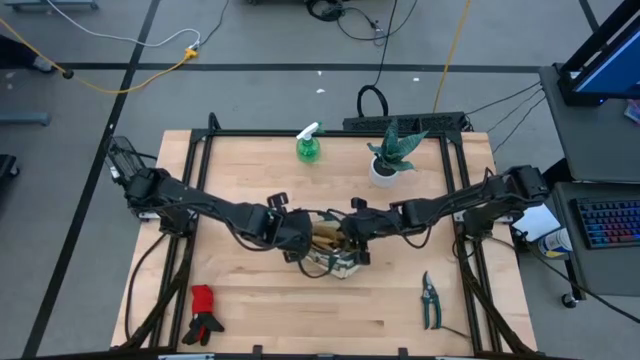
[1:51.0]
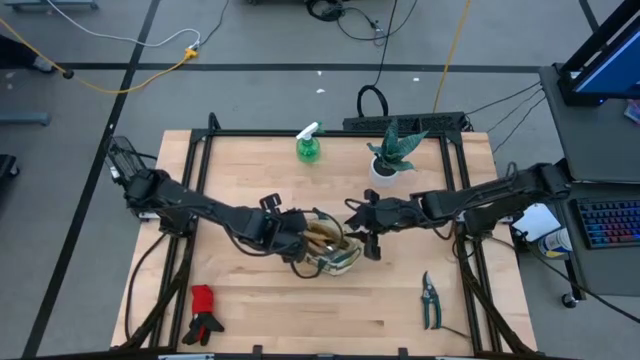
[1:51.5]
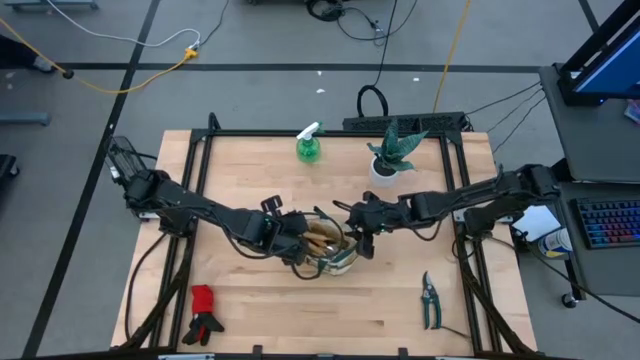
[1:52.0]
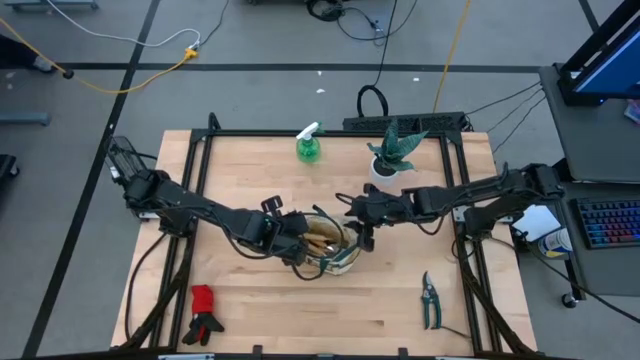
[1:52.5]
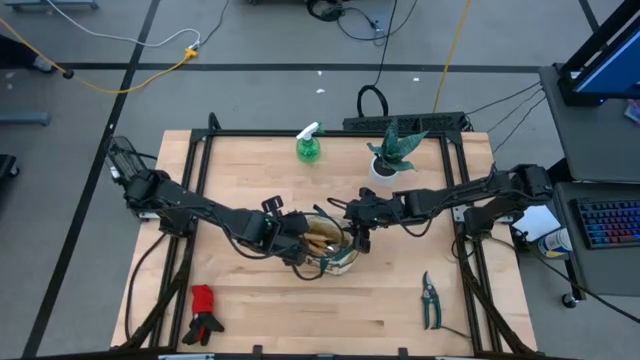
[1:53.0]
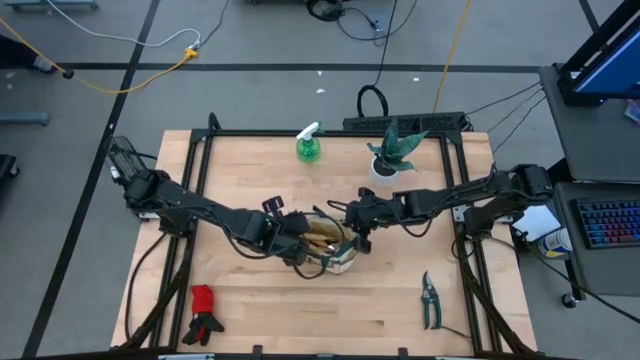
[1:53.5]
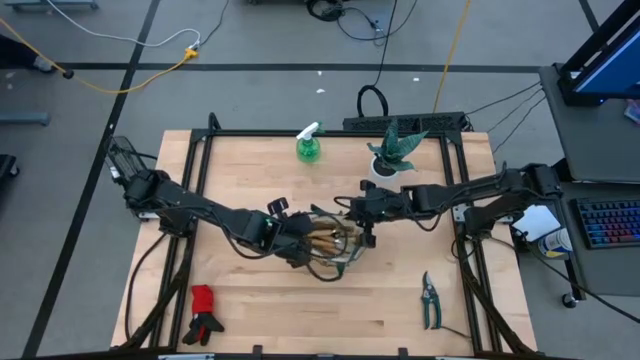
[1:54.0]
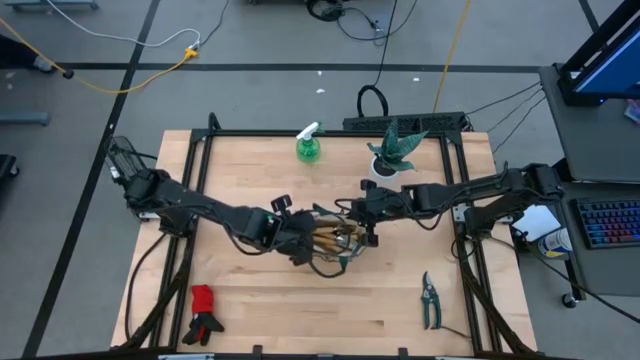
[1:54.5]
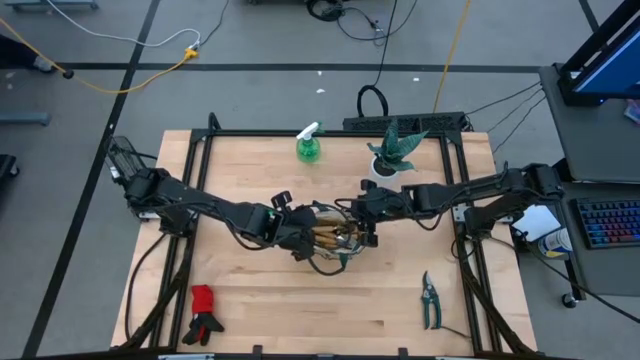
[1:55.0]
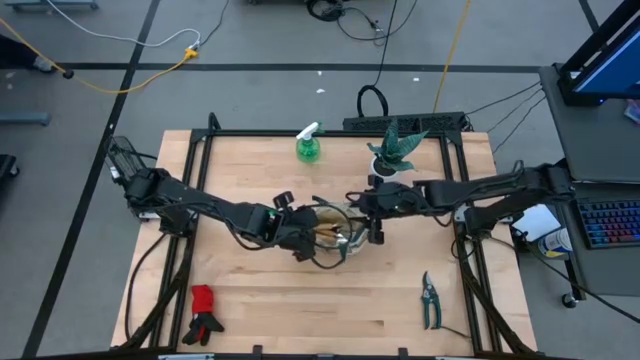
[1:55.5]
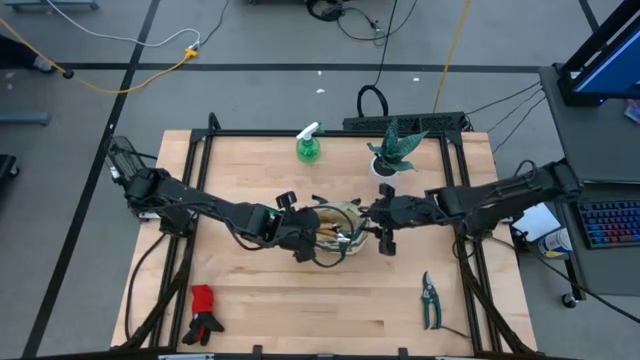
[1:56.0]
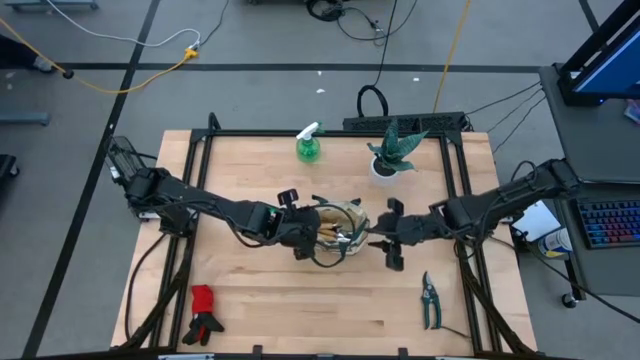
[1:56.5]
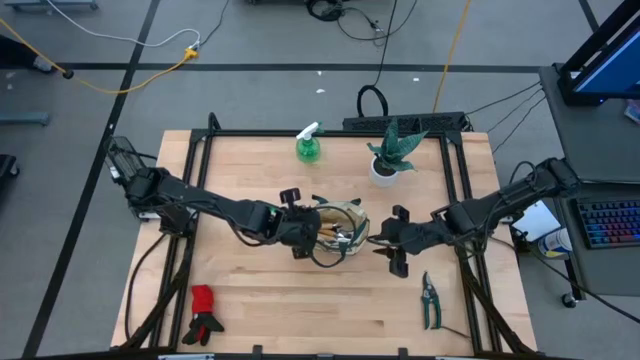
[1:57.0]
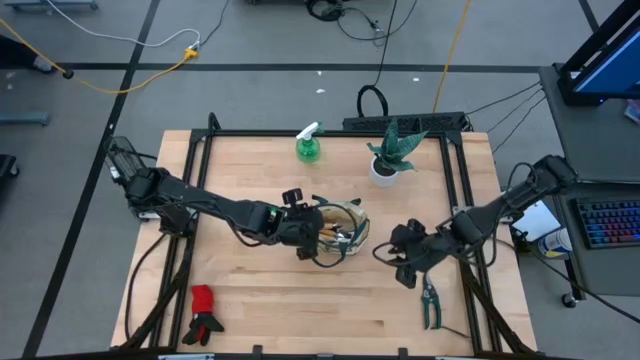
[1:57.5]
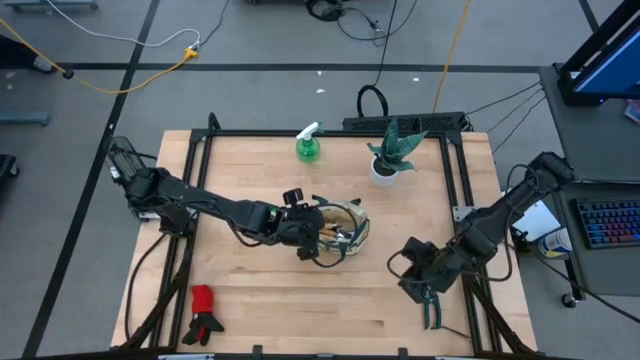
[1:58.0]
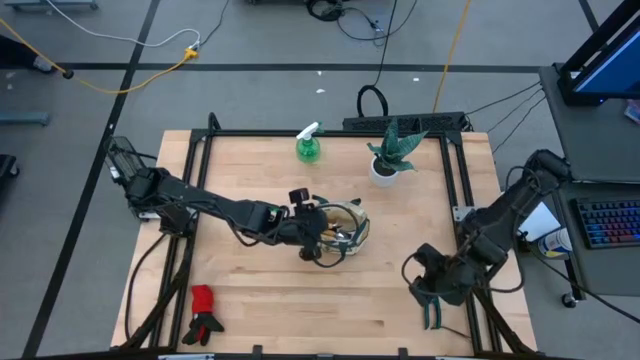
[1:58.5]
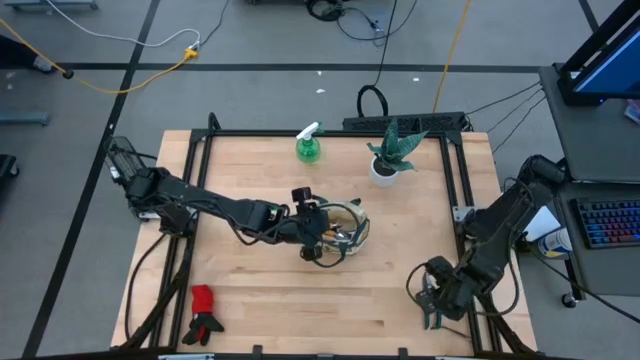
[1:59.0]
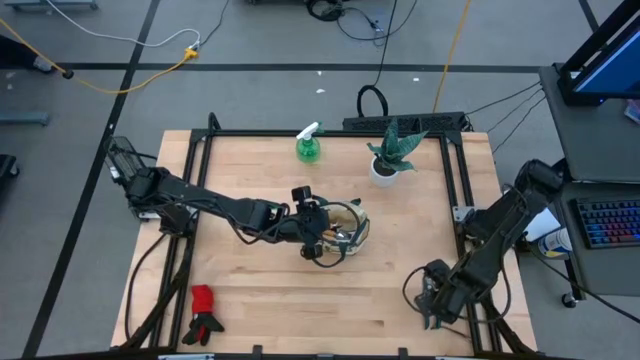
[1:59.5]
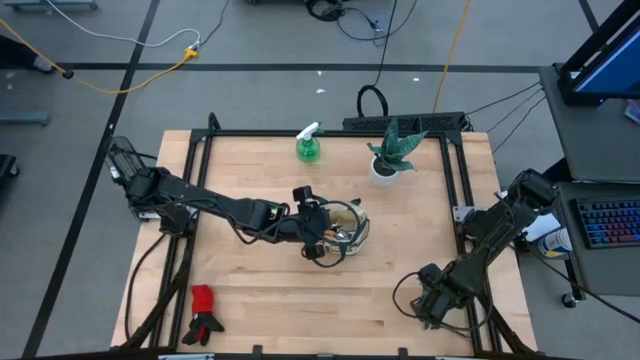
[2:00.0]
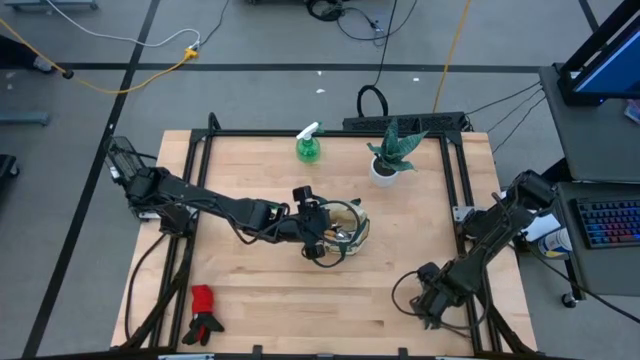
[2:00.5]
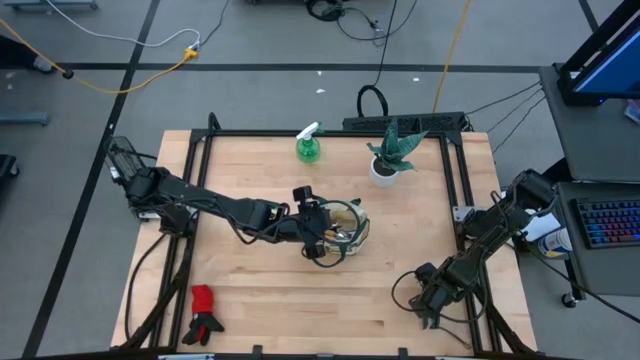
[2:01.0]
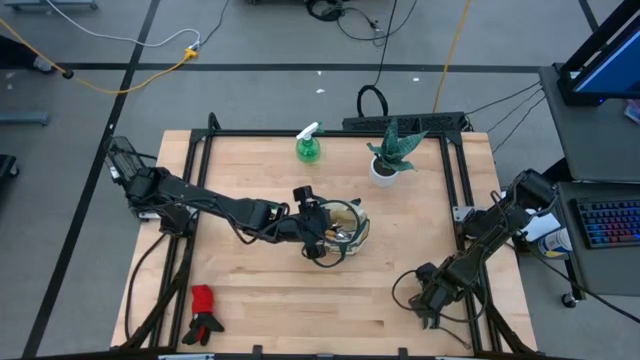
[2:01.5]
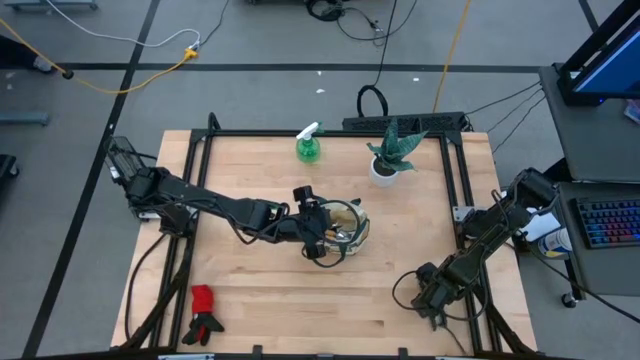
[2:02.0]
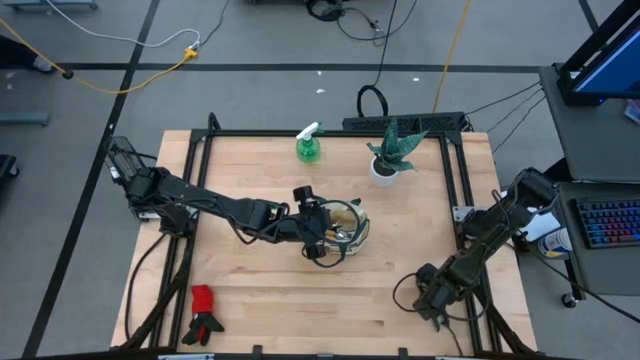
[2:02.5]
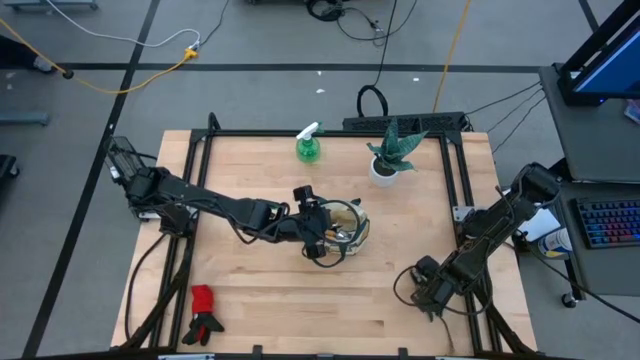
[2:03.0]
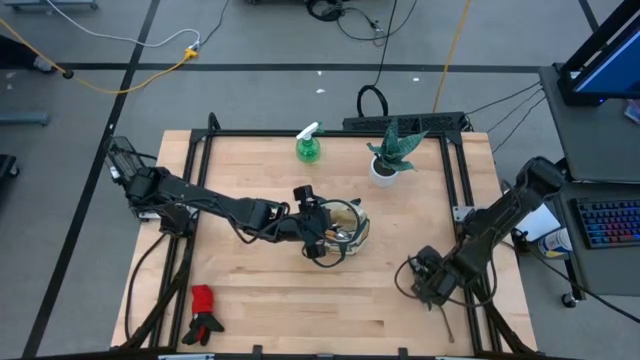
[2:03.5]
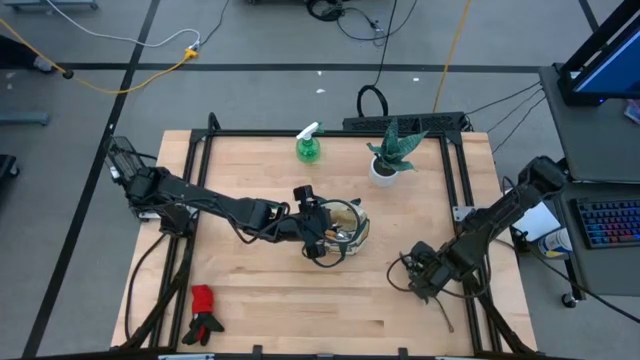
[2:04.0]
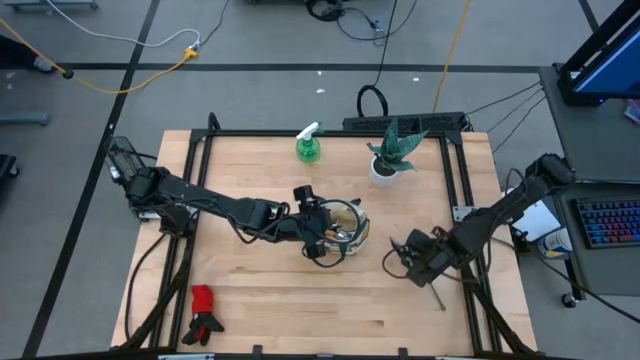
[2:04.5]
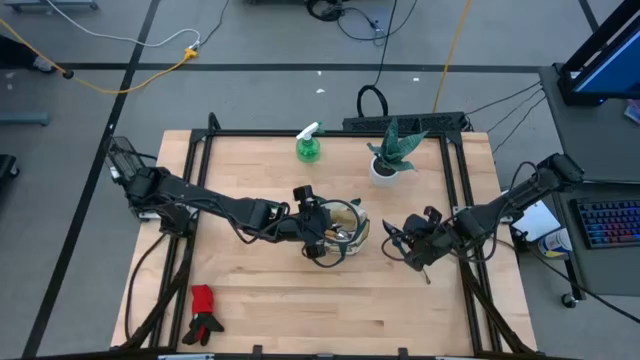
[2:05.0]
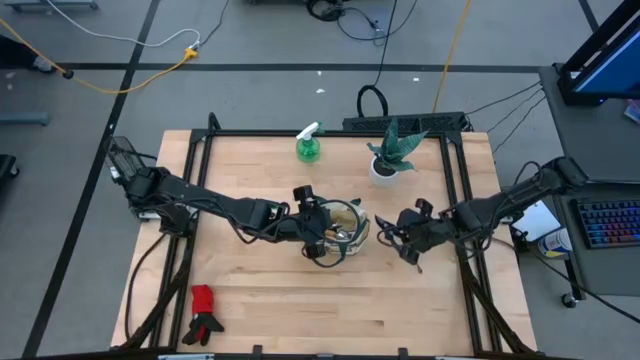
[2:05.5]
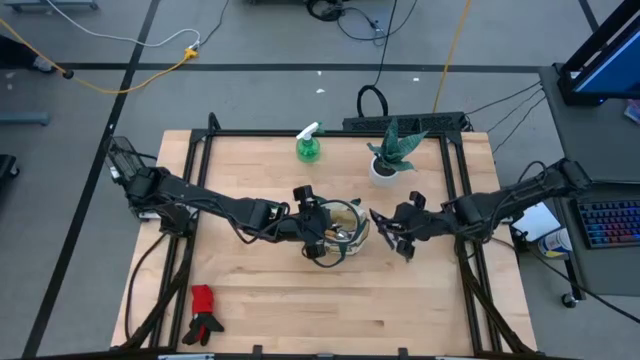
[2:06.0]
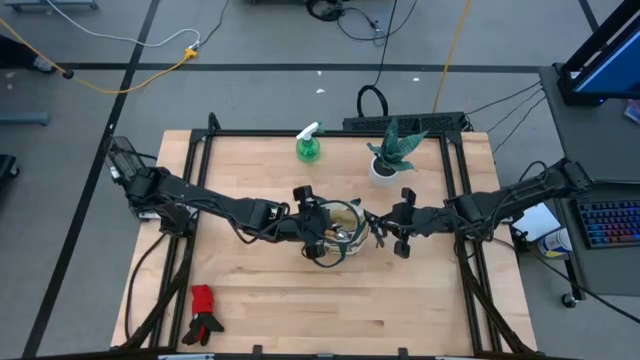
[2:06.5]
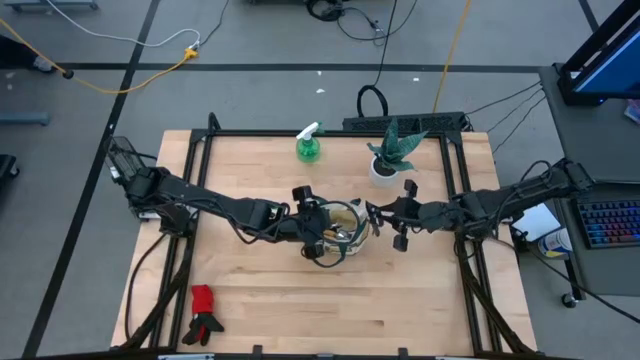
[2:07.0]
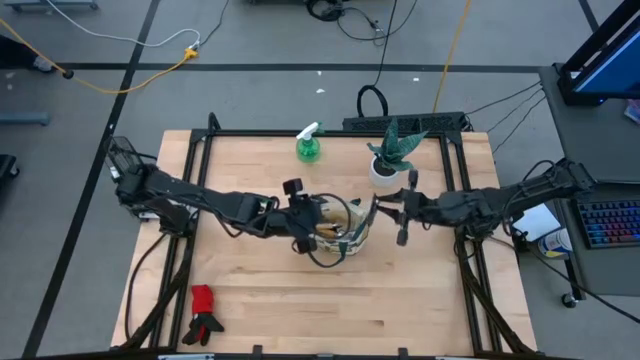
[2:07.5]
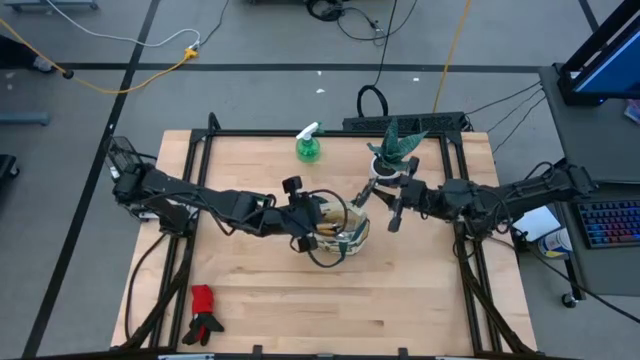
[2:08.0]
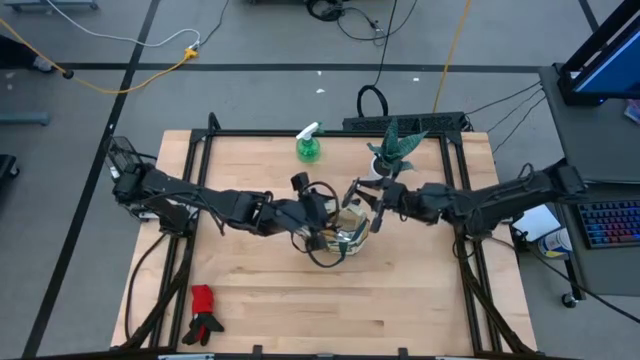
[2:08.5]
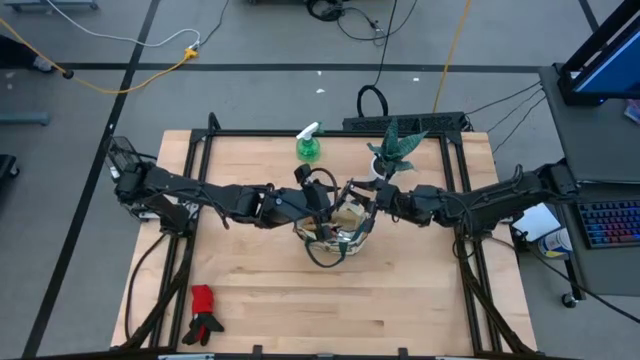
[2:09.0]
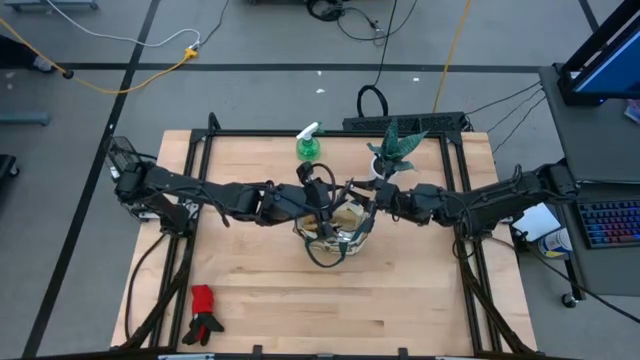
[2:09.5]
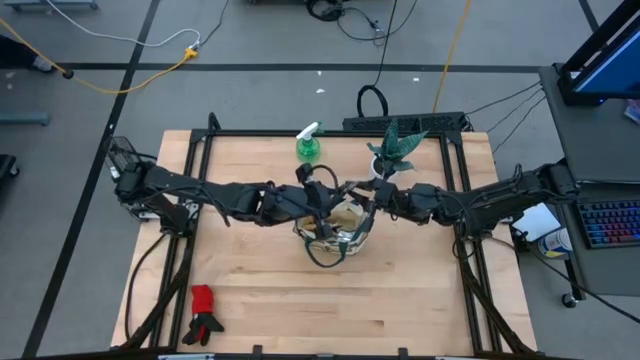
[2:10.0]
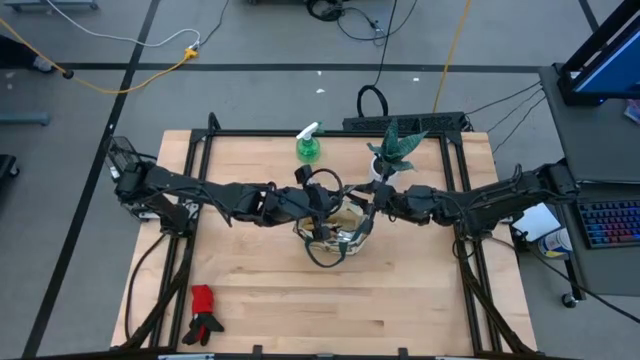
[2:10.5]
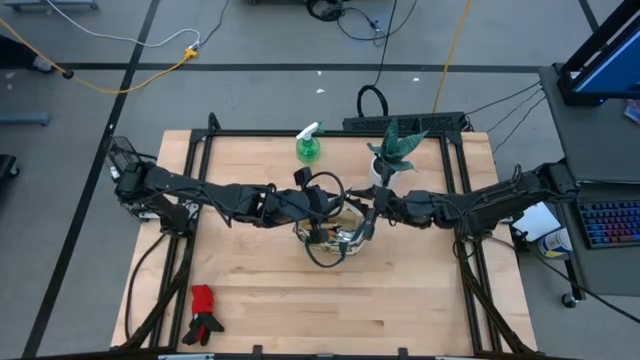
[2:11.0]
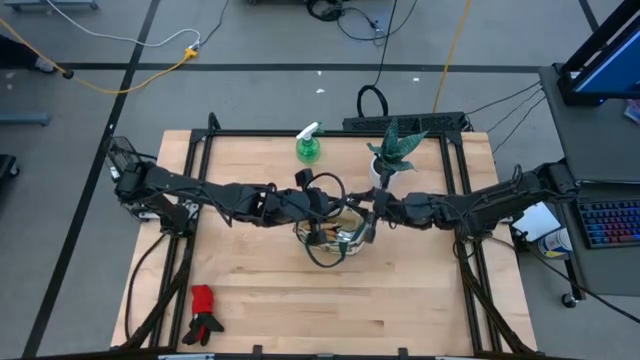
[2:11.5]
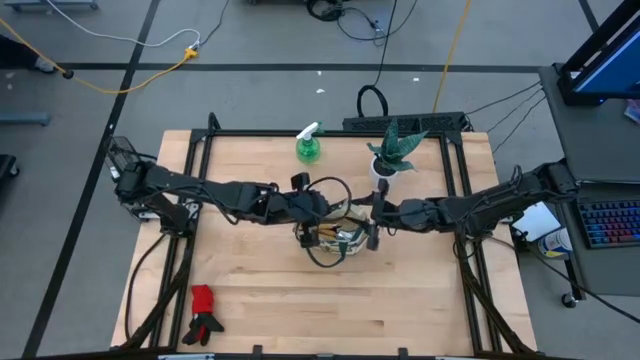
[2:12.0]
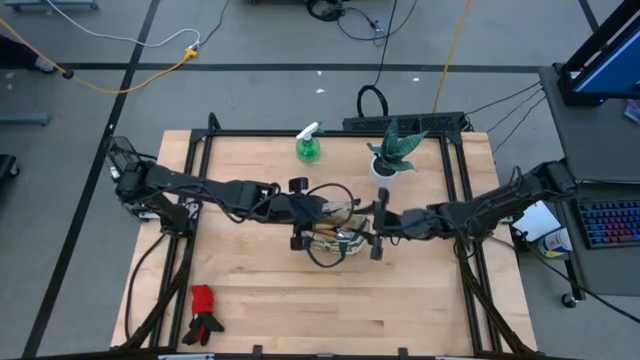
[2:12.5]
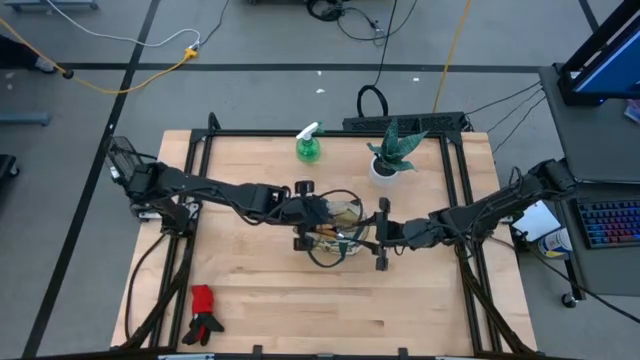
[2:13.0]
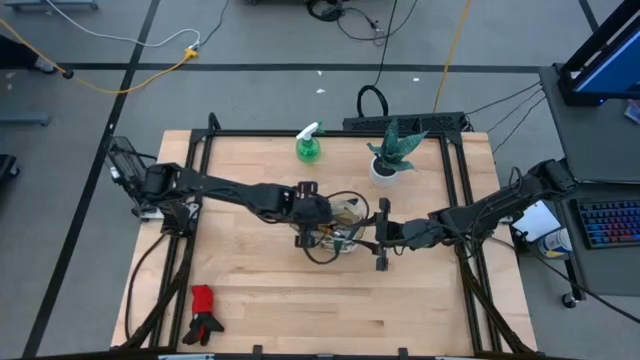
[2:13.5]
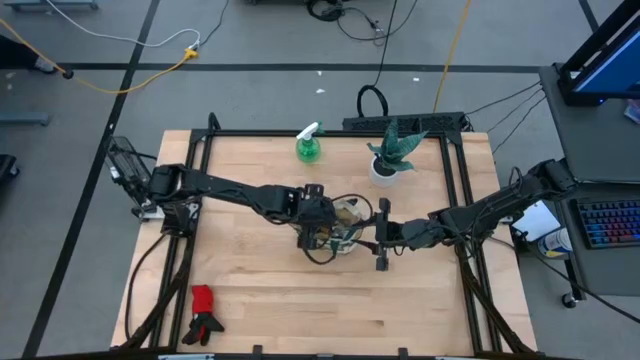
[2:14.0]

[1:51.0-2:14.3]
Task: Pick & Place Garden tools in Gardening bag
Put the green shear scissor into the gardening bag
